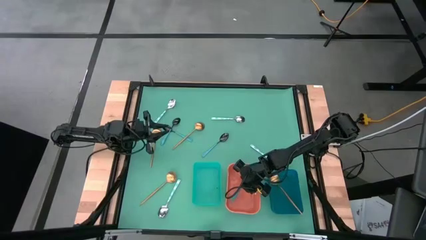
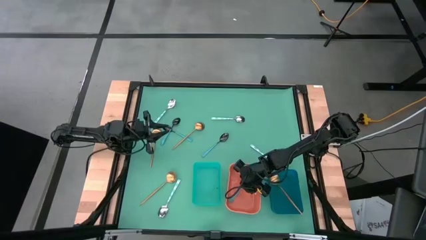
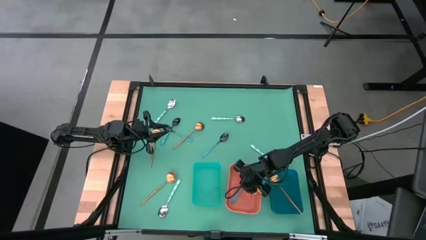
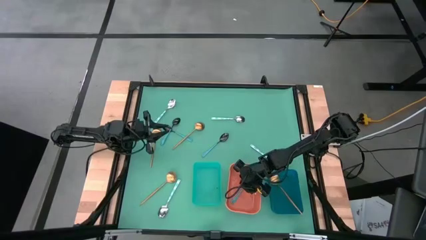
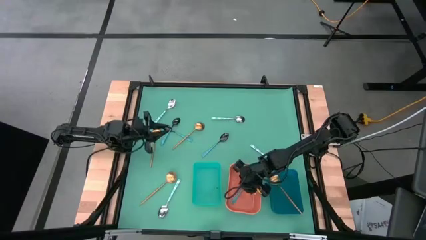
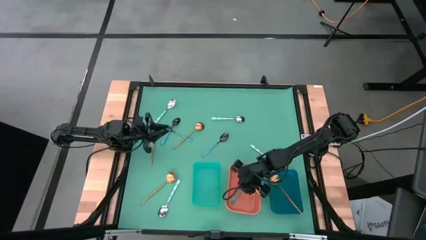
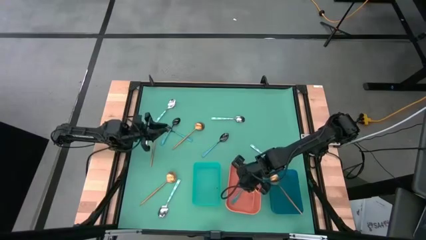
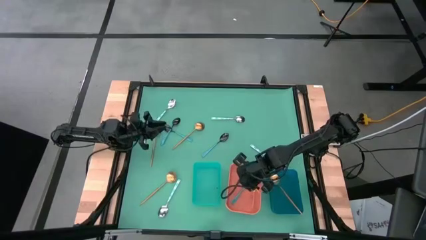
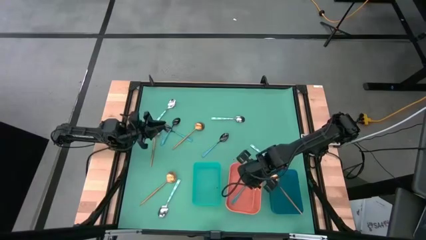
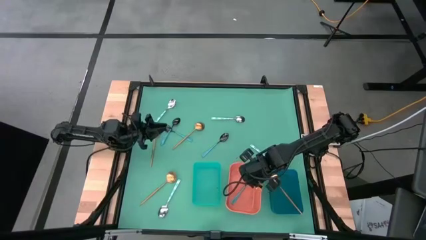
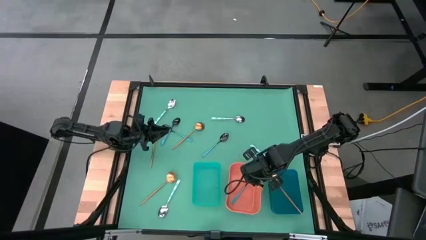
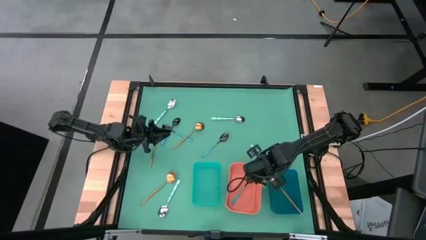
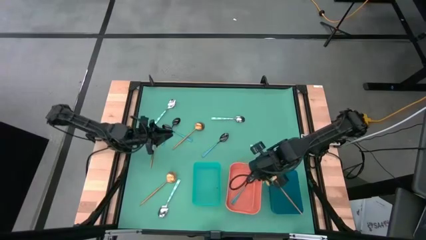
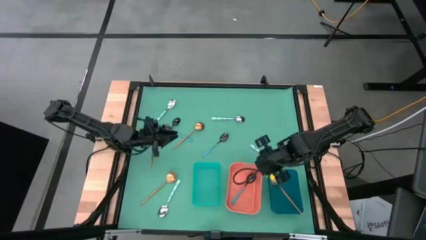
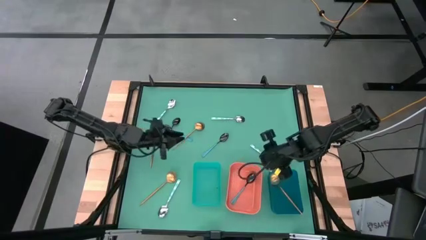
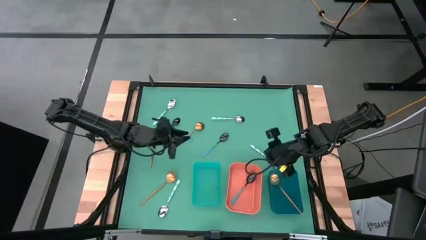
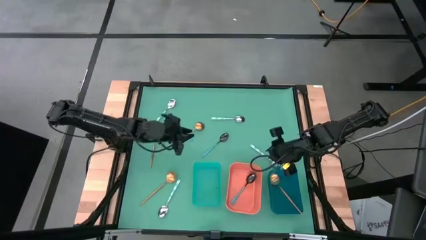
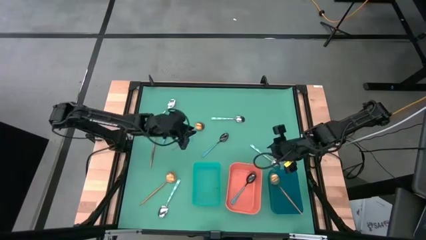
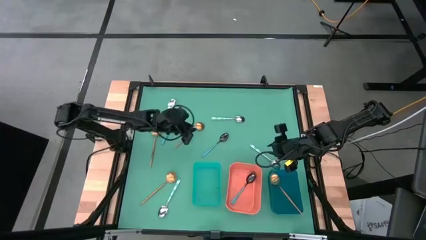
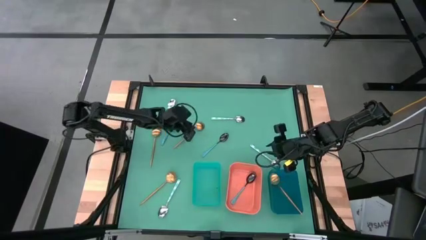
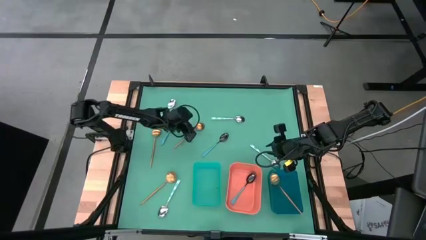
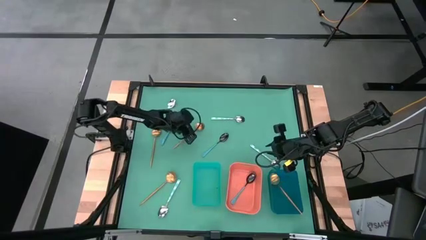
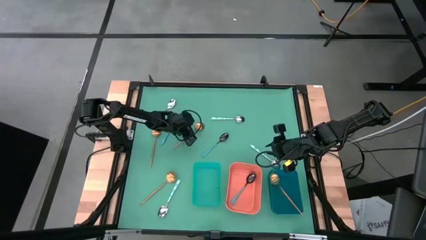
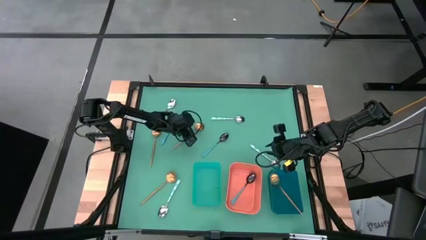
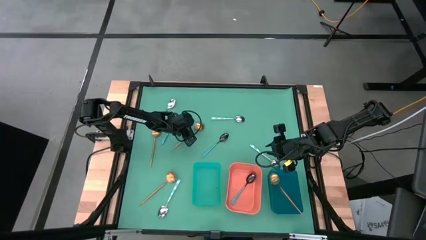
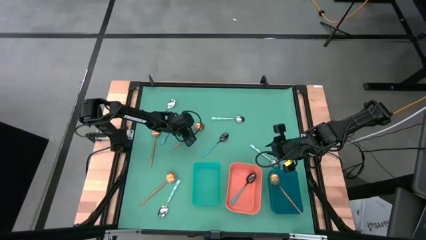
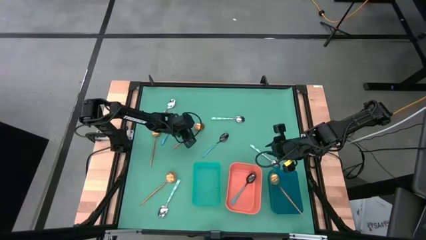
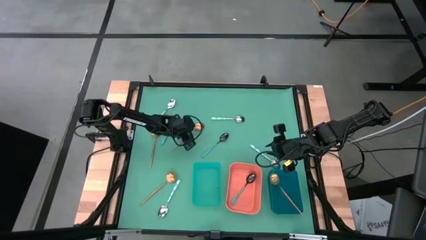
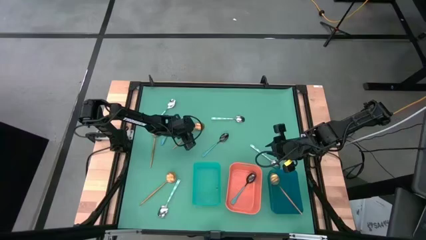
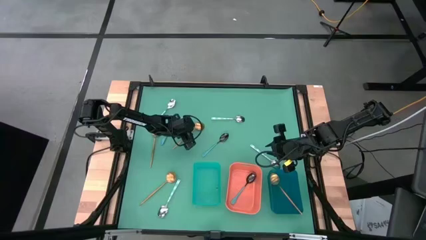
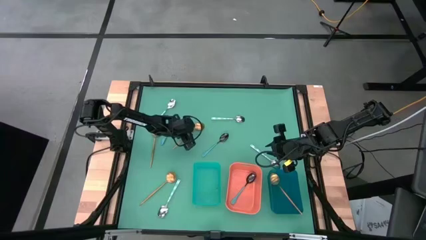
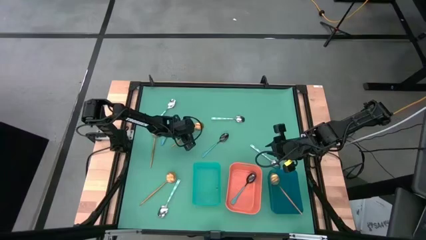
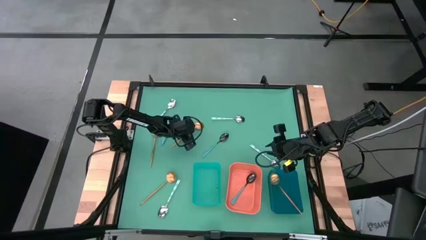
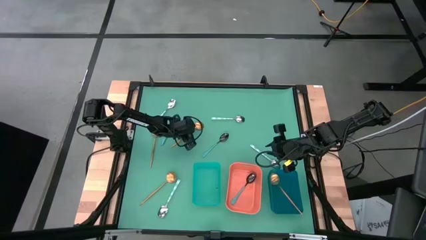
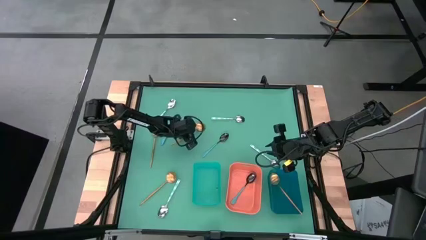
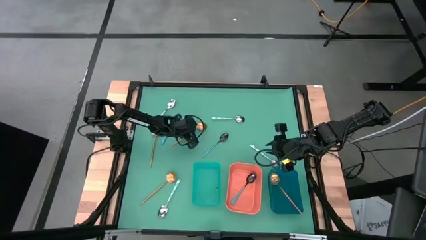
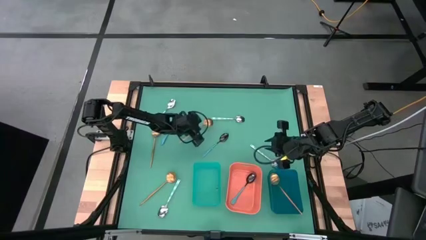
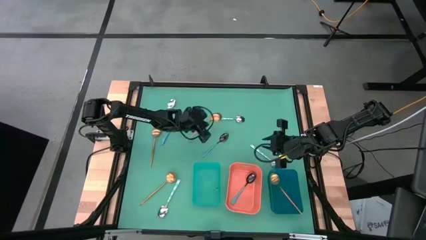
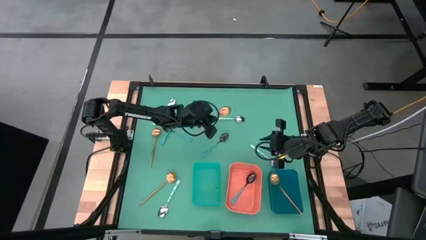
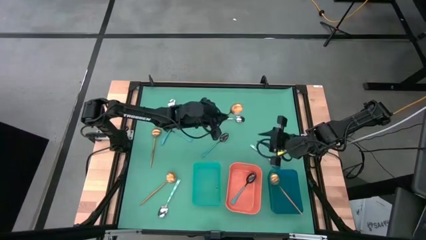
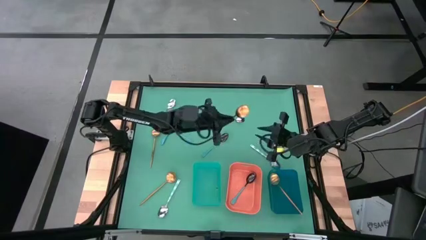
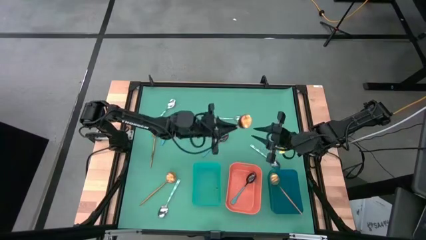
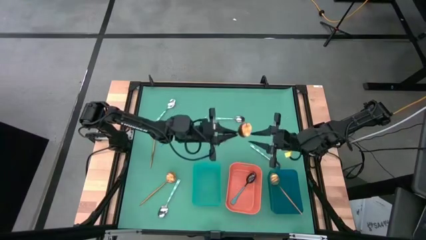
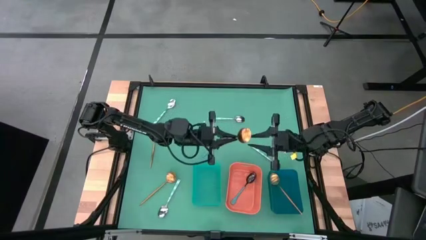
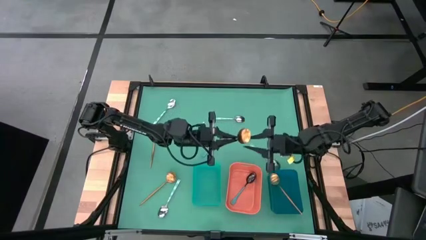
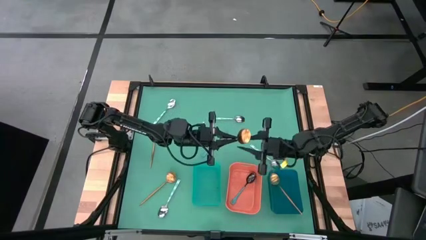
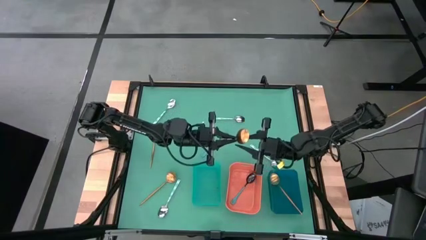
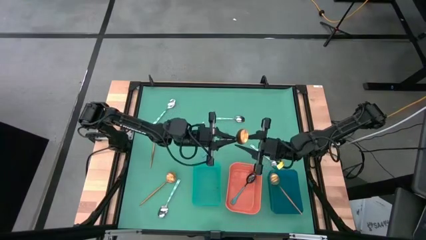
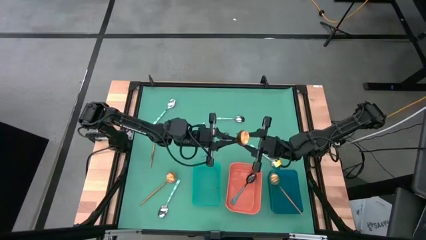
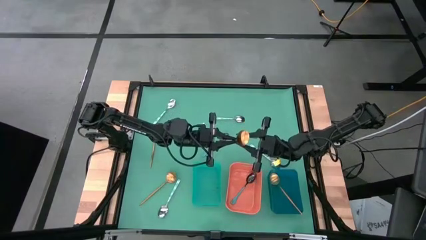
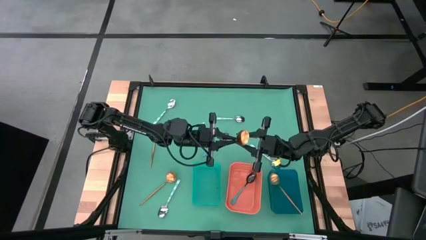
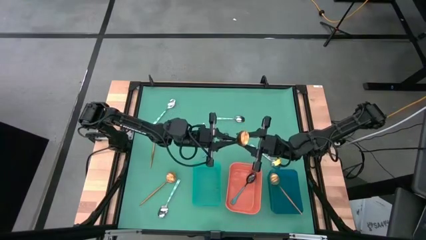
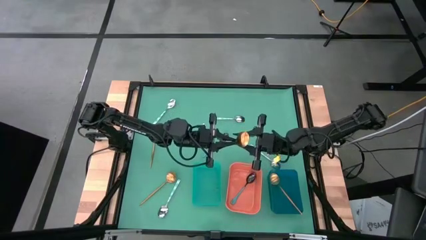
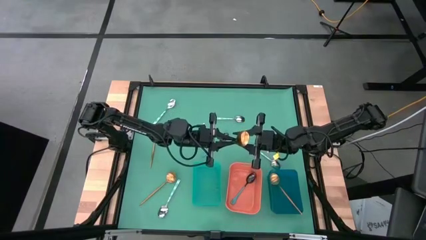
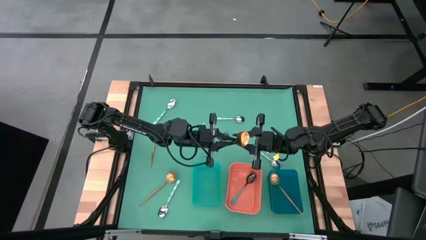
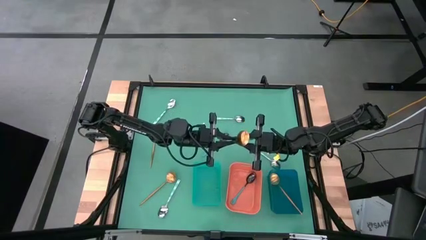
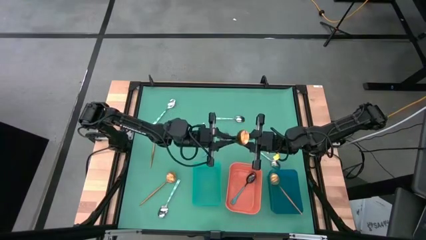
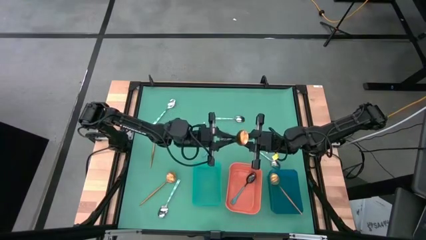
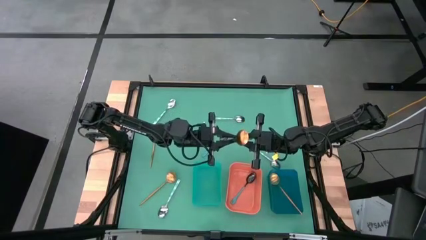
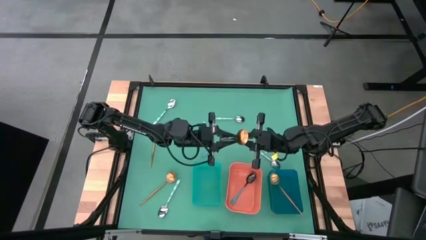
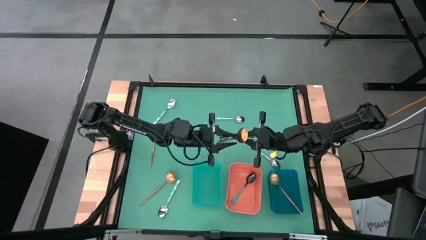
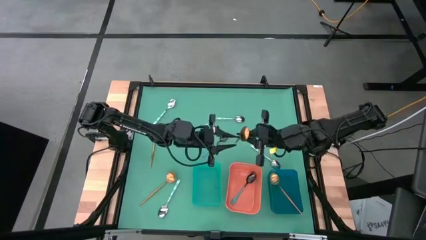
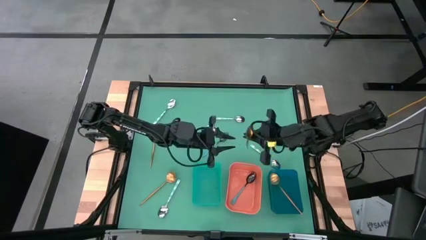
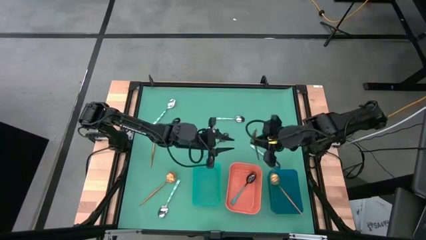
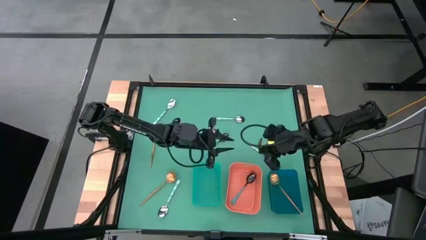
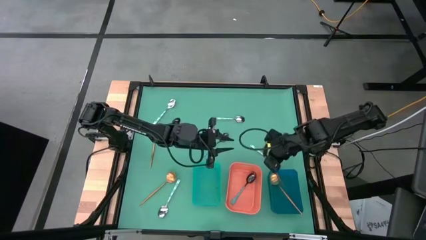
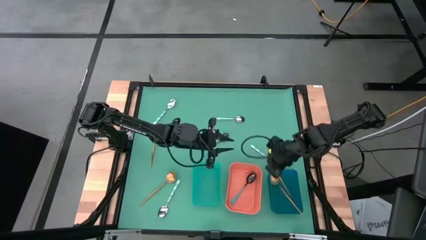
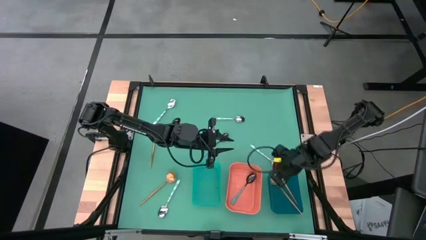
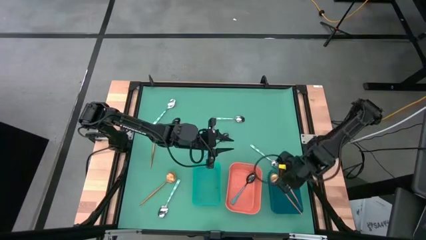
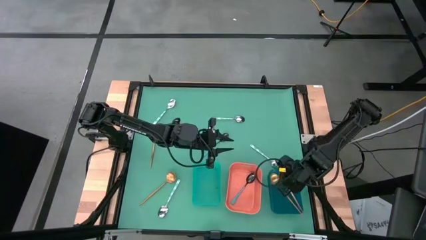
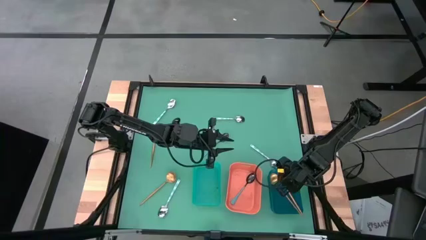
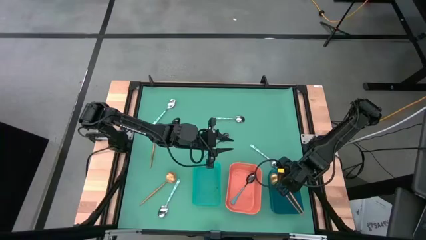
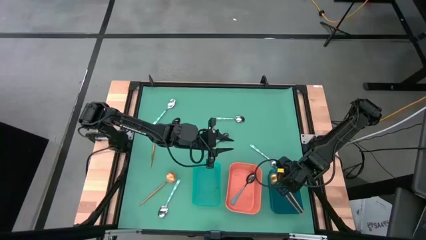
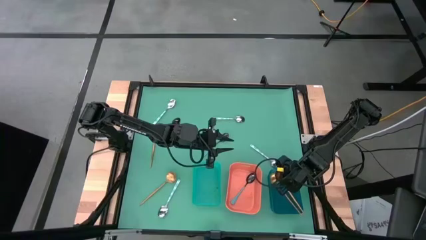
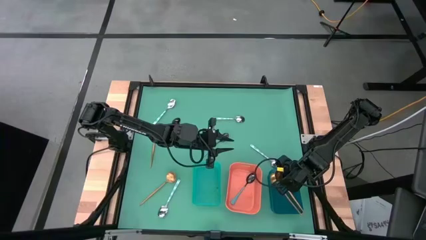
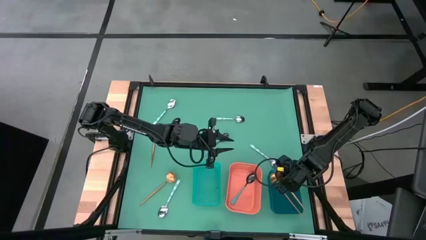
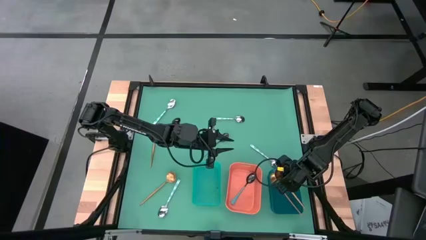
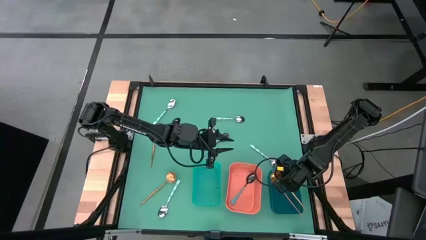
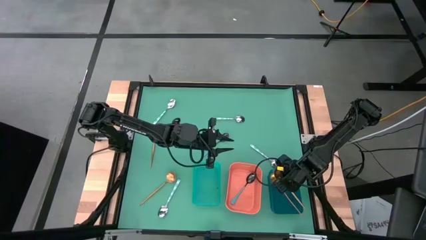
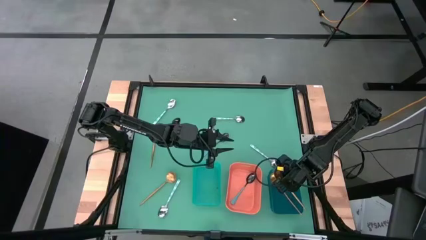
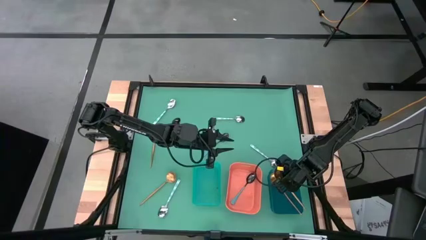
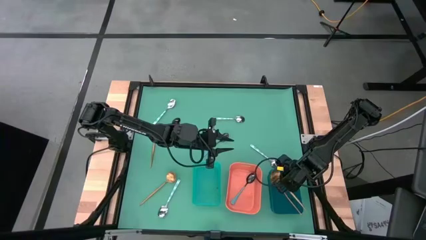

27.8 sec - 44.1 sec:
Task: Sort silverware by color (type)
Put the golden spoon into the blue bin
